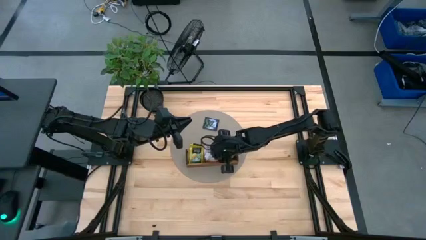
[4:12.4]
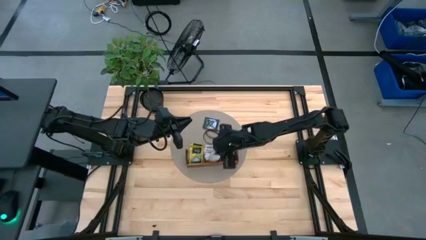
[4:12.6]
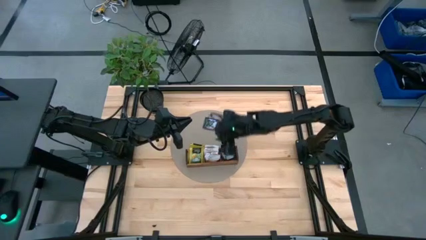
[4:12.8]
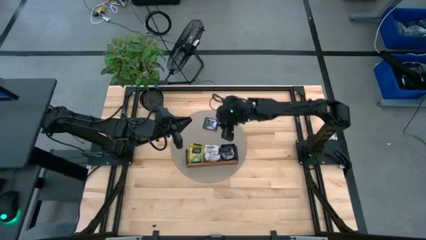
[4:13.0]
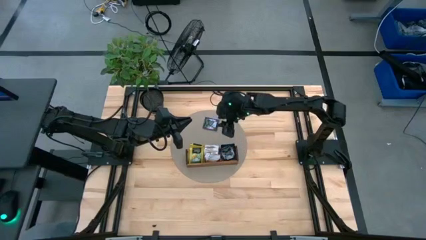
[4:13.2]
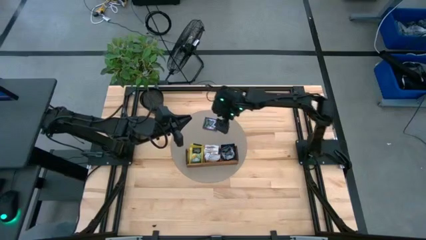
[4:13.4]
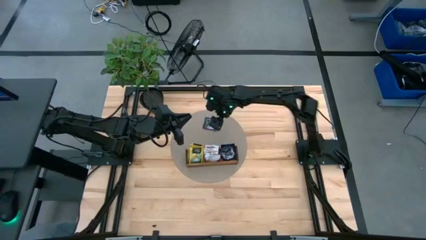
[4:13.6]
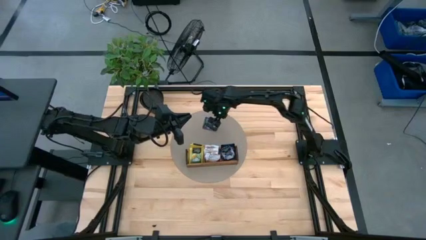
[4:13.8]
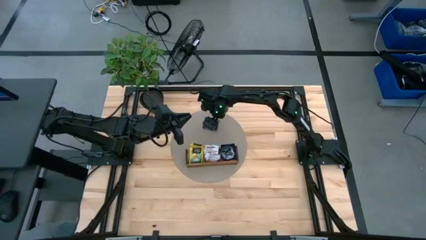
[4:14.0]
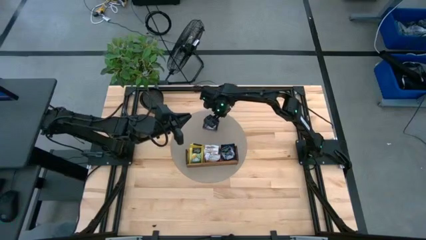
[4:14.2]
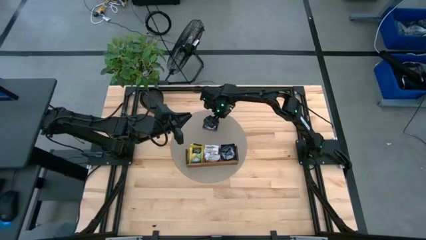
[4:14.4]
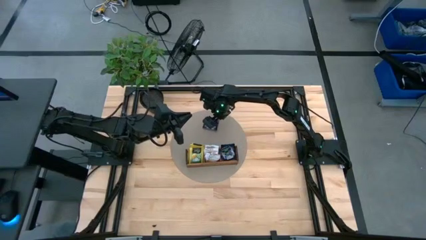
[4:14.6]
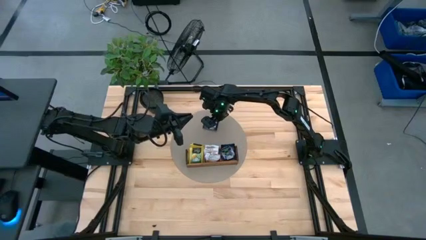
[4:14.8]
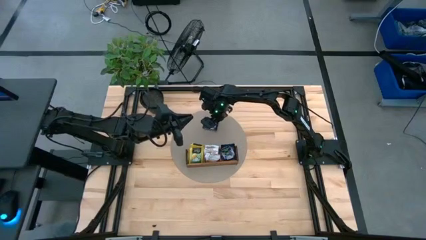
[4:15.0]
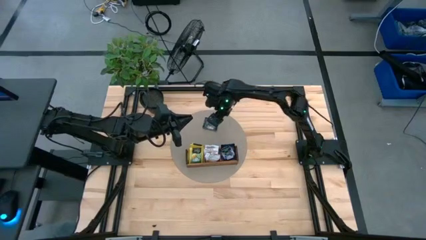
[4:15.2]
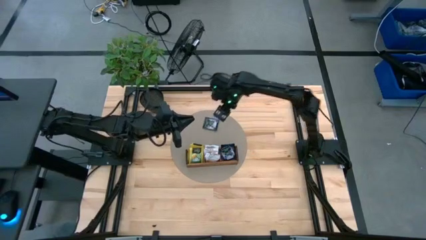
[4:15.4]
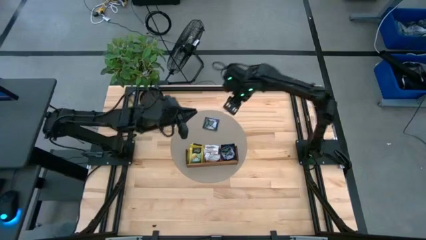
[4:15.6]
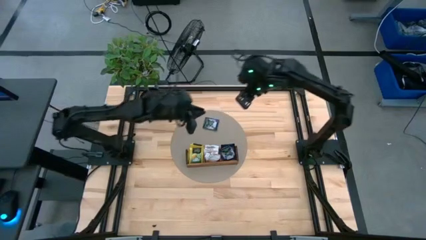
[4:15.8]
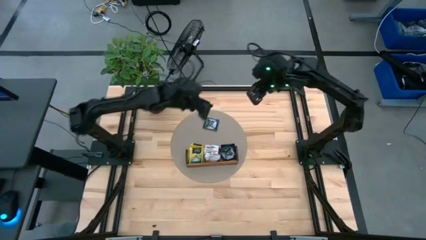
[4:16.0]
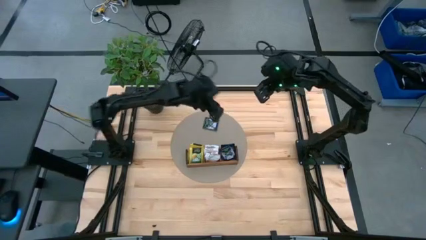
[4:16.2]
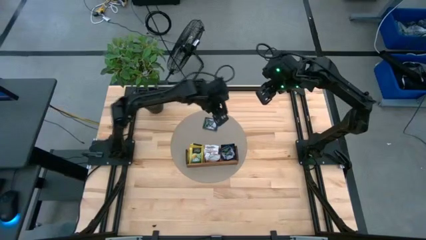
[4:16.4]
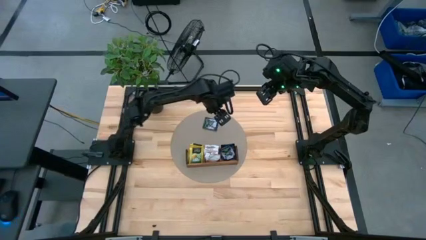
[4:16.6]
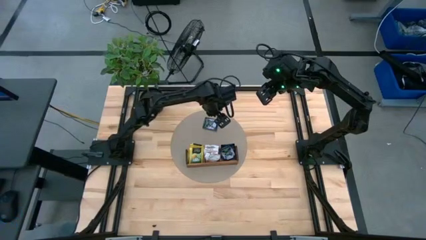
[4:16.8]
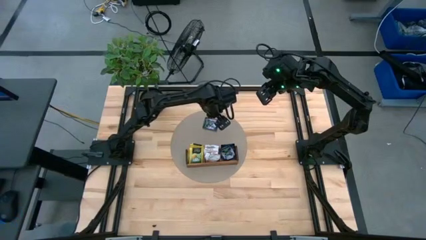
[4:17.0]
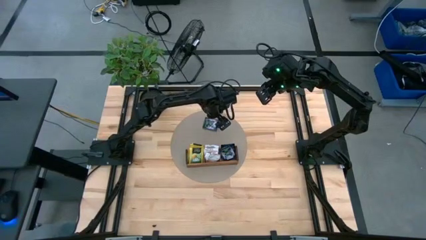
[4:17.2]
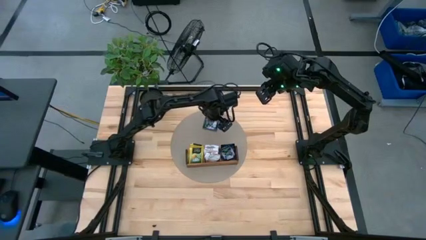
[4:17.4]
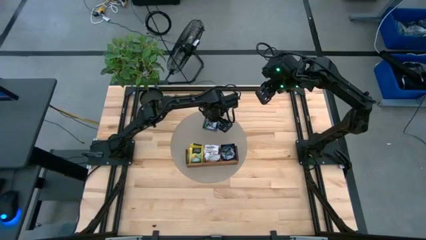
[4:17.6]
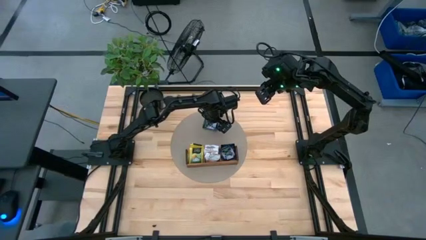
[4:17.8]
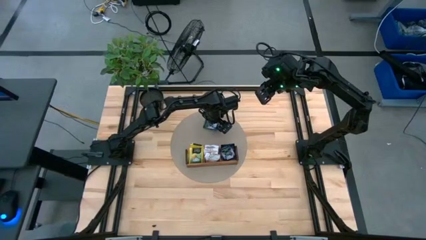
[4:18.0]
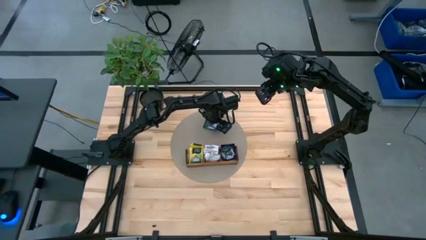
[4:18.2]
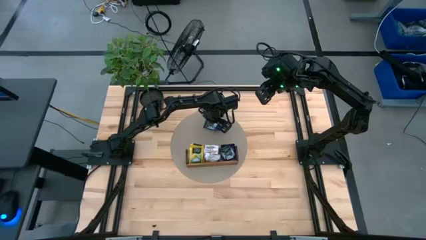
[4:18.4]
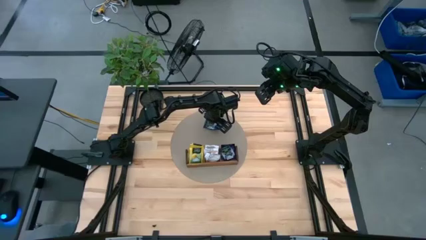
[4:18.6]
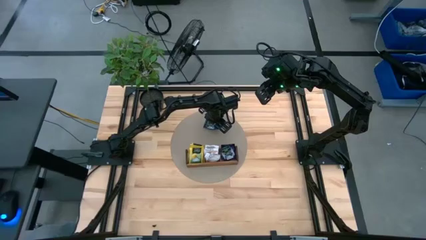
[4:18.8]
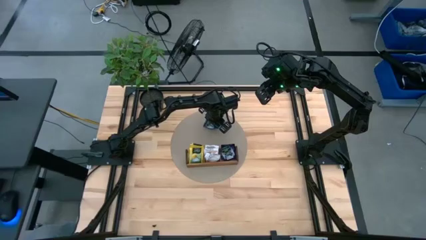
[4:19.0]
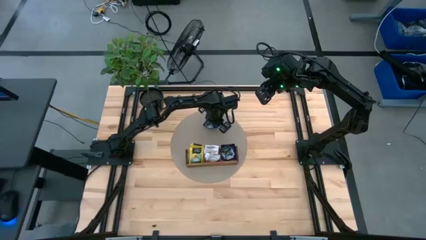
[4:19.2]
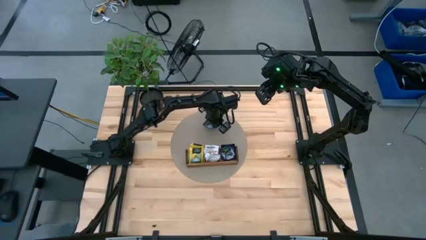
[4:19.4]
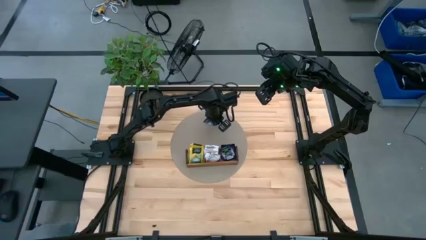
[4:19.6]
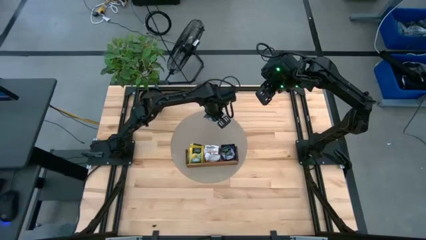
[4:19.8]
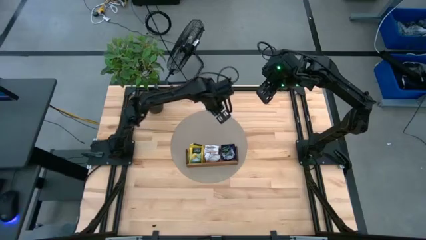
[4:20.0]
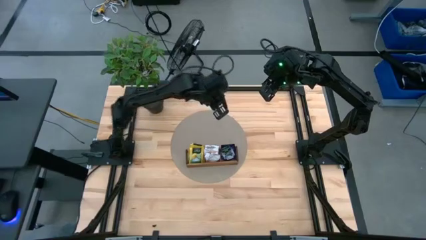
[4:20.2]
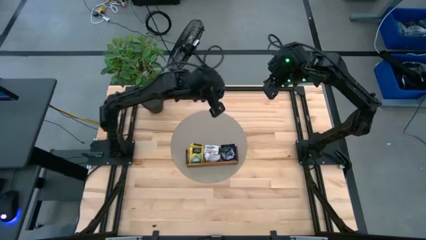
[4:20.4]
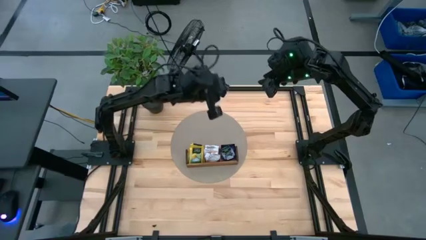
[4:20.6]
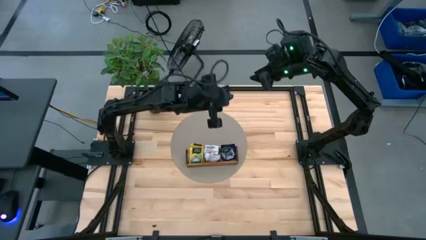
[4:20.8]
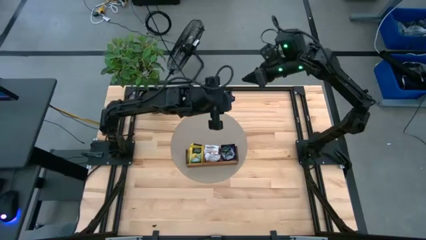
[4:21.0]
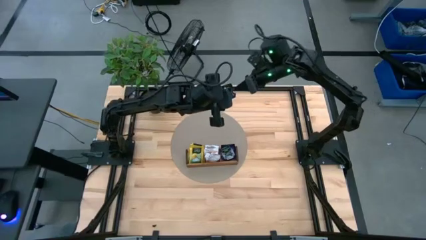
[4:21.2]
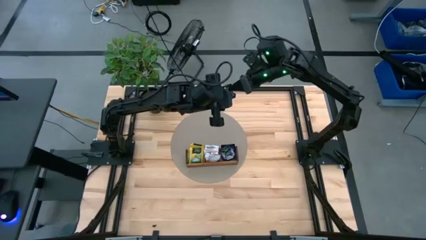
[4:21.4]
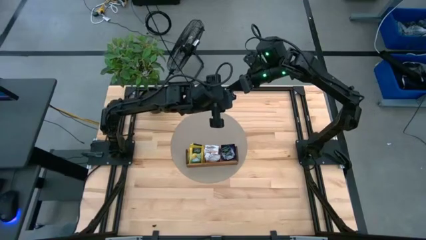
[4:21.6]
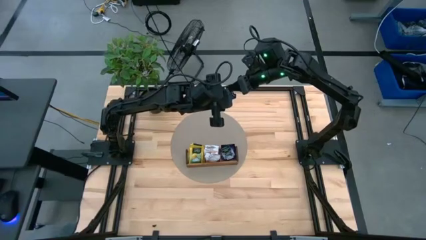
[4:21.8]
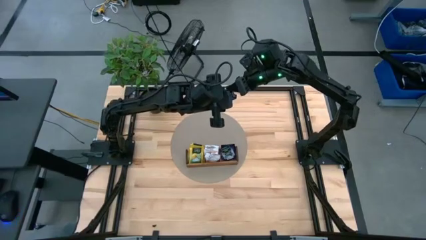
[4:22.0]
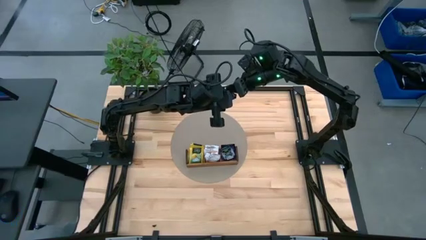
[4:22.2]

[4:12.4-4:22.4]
Task: Pick & Place Tea
Put the violet tea bag into the right section of the wooden organizer

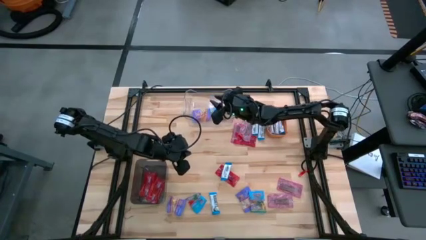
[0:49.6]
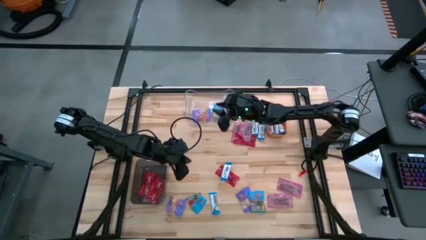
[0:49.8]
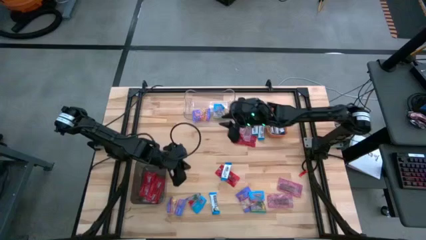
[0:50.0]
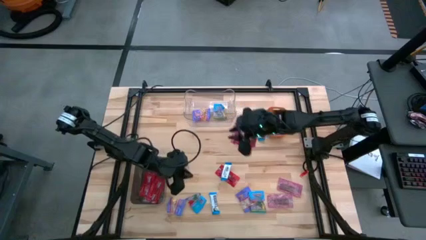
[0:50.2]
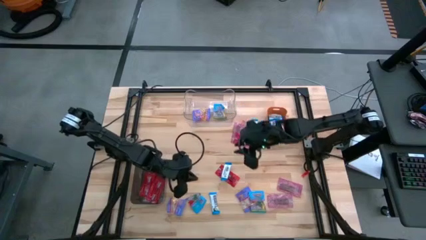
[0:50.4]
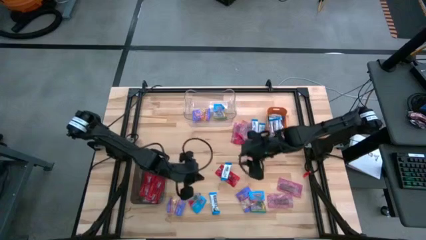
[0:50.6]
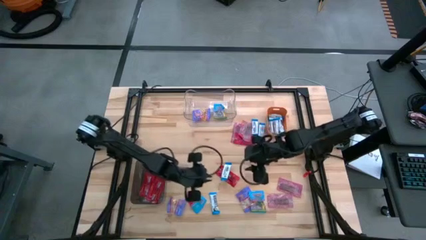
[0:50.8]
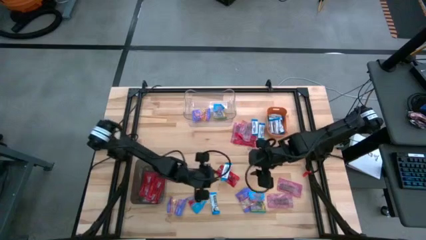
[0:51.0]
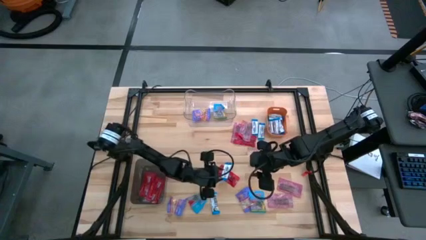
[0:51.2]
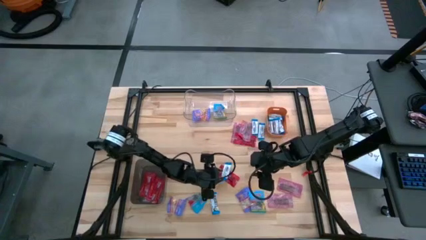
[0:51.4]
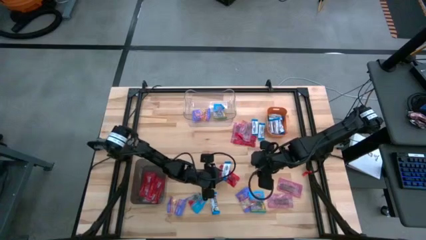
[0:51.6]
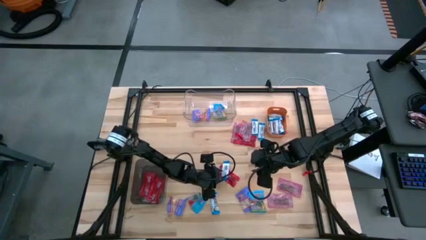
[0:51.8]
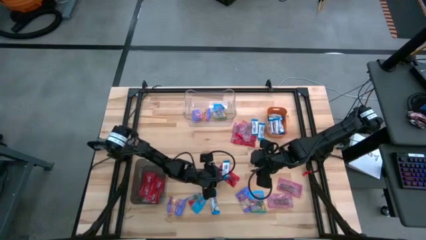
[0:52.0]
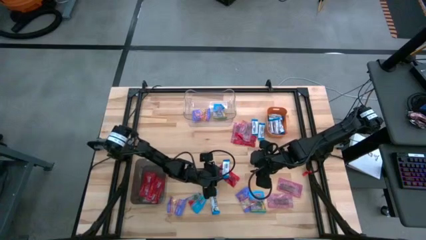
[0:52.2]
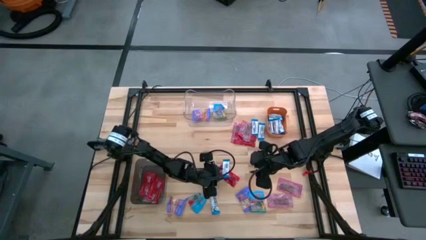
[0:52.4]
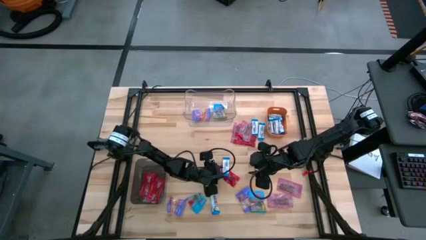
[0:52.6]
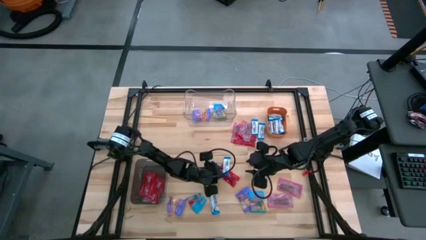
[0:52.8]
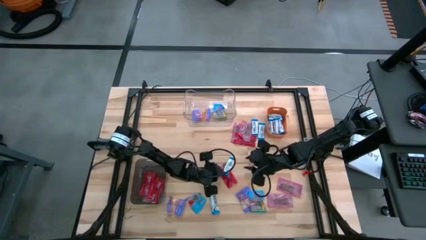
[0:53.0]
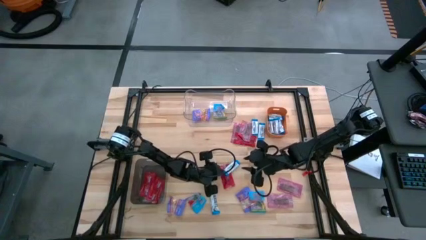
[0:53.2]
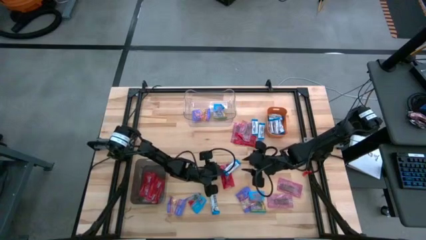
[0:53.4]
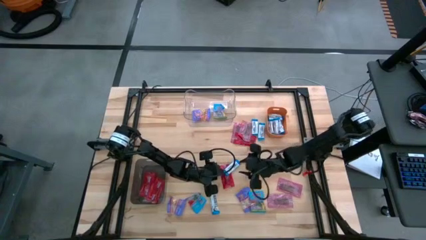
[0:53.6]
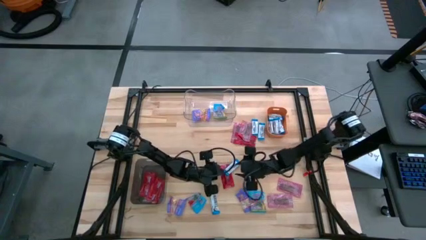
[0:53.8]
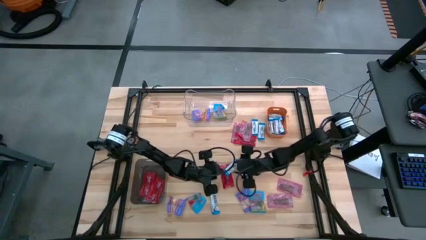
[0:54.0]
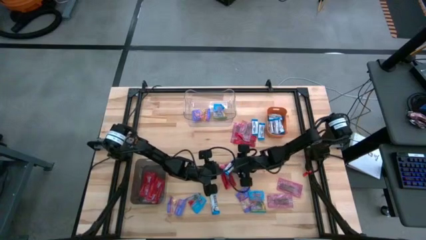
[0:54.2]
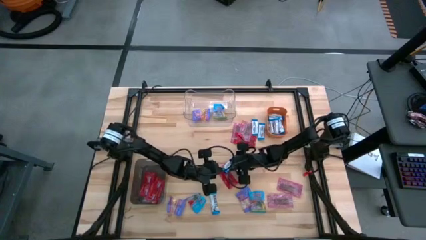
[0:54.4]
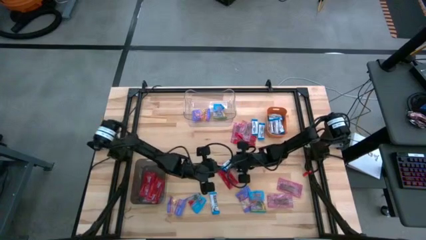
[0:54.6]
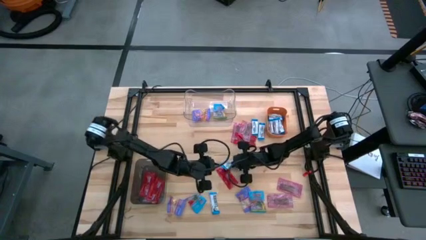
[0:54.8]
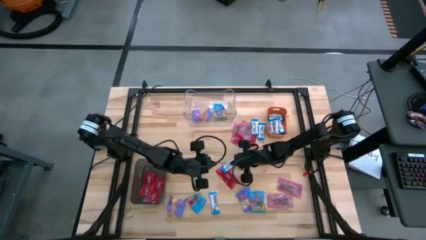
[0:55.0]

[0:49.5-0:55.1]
Task: Sort candy
Put the white chocolate into the orange bin

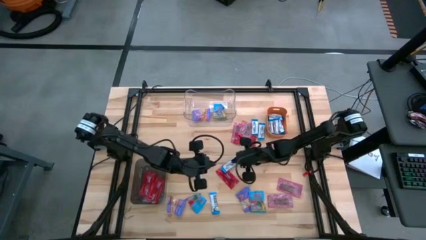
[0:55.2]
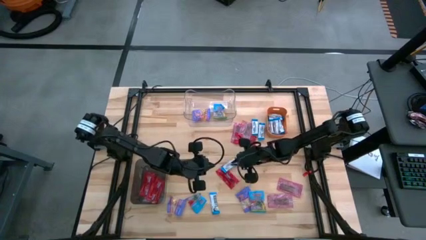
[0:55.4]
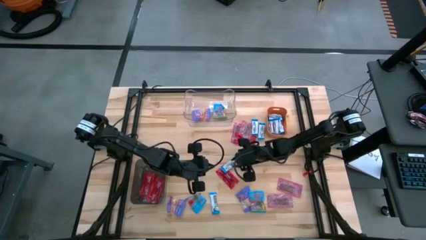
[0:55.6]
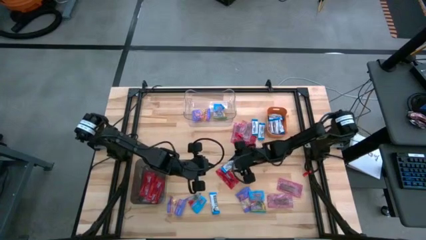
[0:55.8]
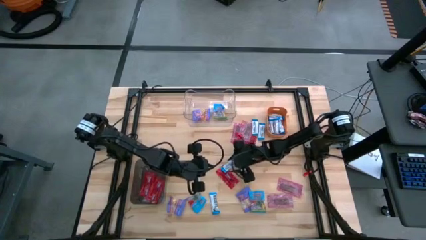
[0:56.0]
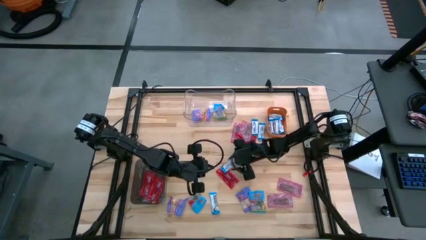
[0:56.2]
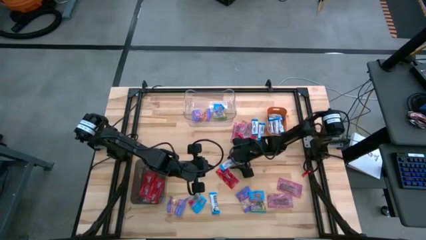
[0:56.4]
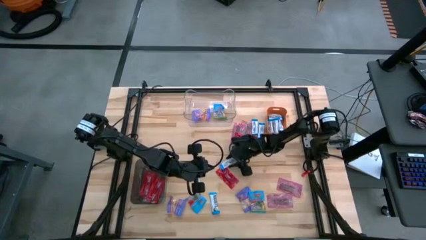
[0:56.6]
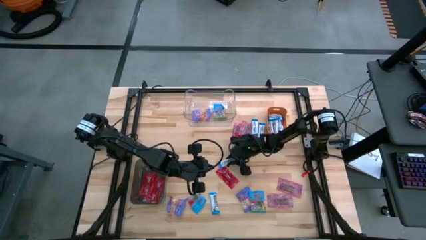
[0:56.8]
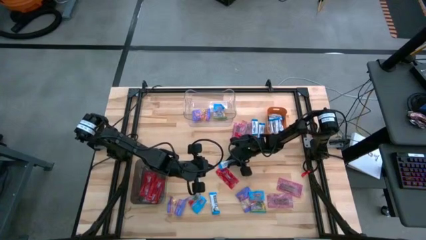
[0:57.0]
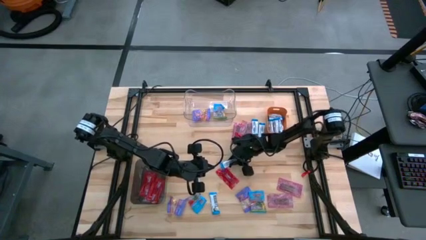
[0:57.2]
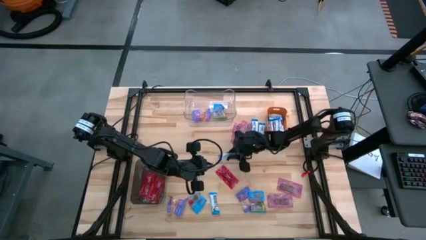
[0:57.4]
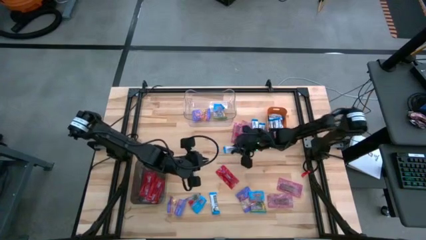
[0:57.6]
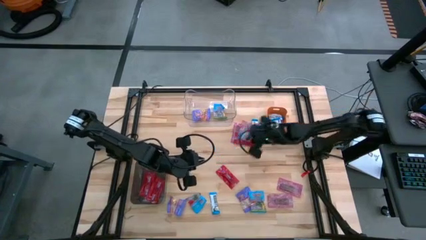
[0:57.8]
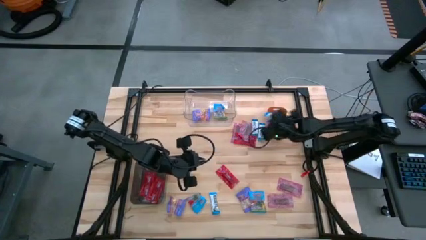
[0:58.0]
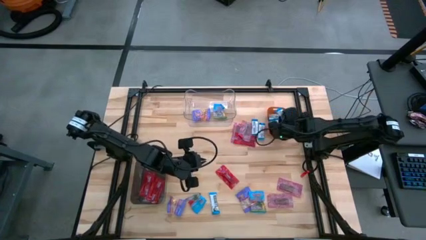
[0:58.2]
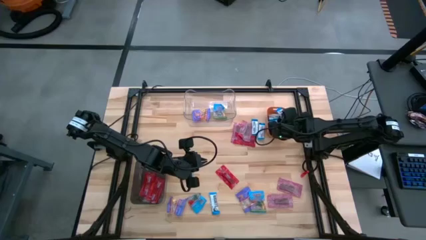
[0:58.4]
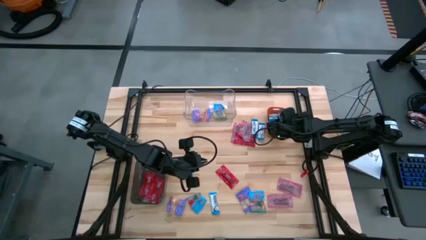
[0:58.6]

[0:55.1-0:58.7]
Put the white chocolate into the orange bin
